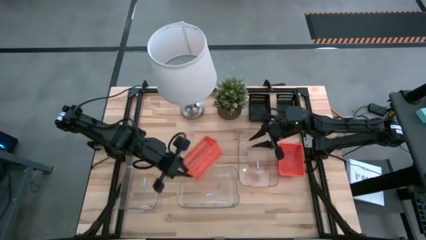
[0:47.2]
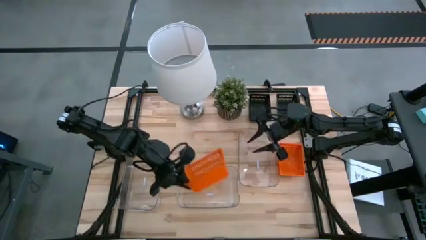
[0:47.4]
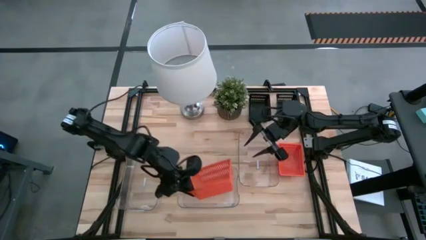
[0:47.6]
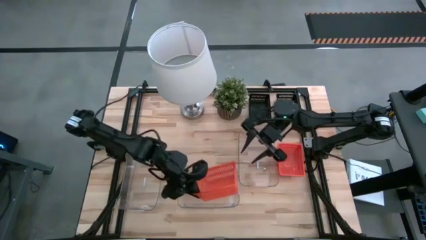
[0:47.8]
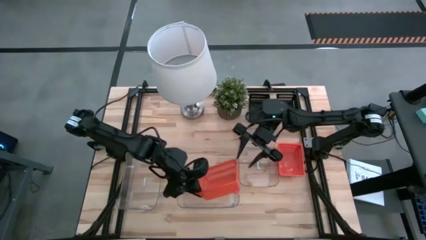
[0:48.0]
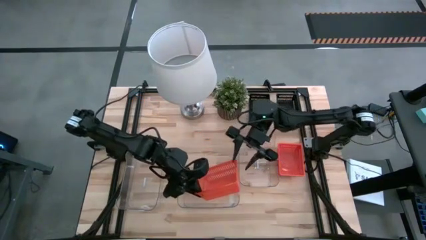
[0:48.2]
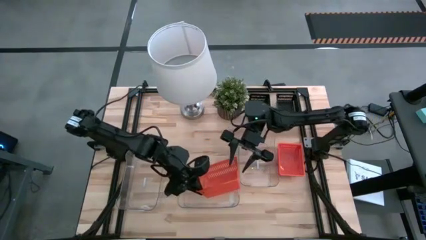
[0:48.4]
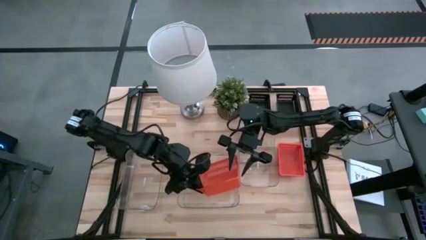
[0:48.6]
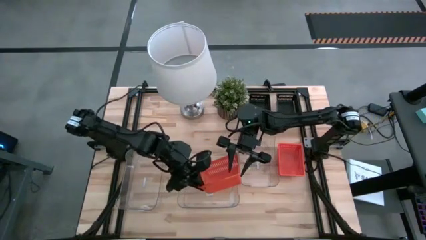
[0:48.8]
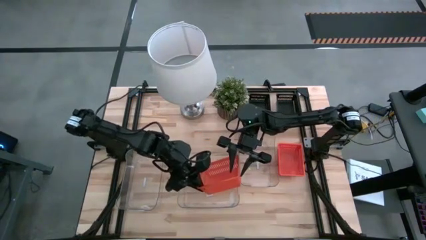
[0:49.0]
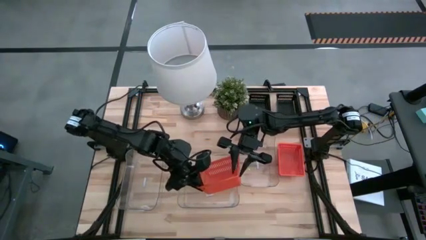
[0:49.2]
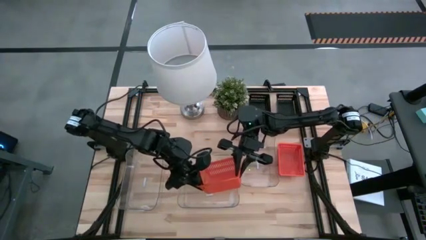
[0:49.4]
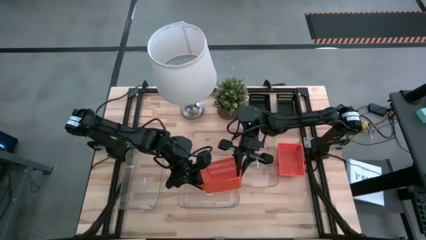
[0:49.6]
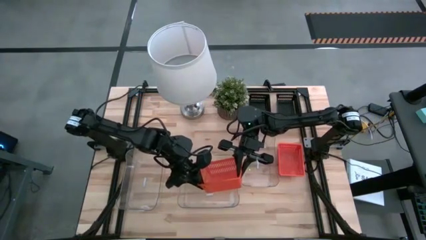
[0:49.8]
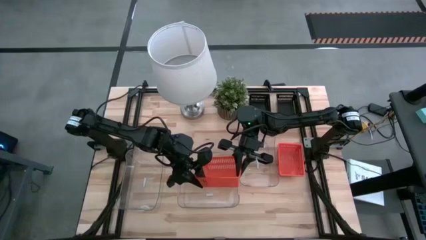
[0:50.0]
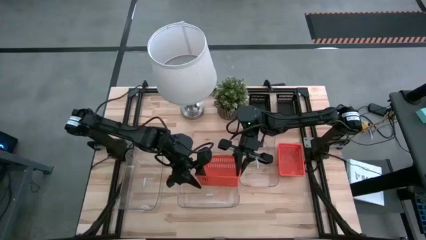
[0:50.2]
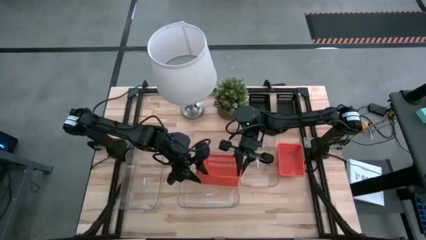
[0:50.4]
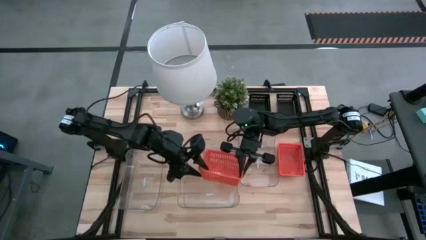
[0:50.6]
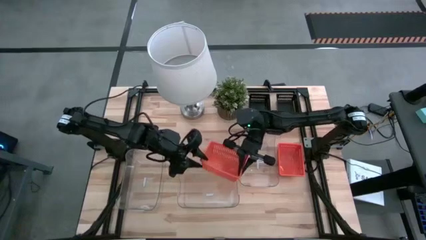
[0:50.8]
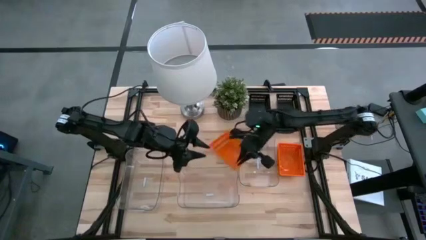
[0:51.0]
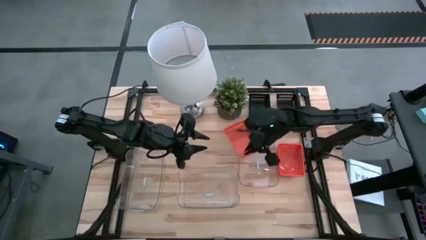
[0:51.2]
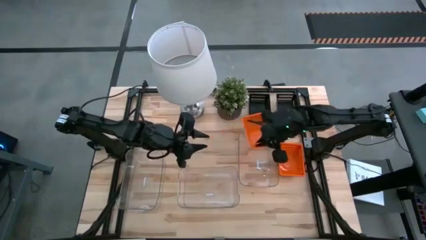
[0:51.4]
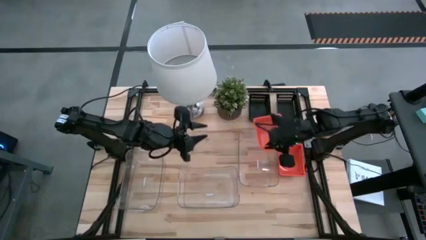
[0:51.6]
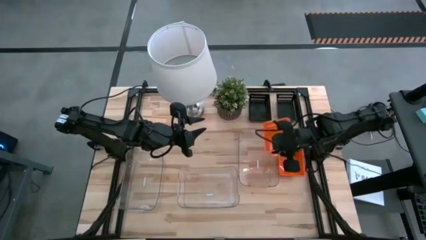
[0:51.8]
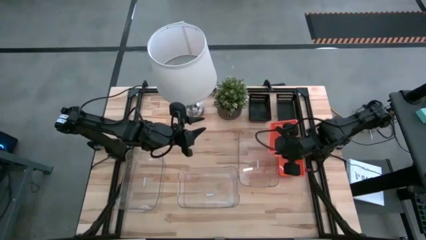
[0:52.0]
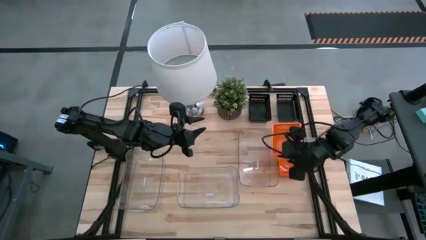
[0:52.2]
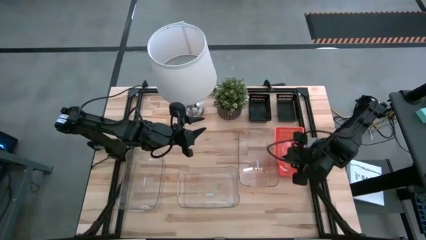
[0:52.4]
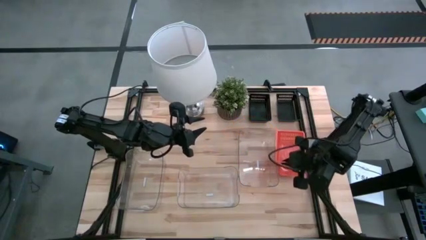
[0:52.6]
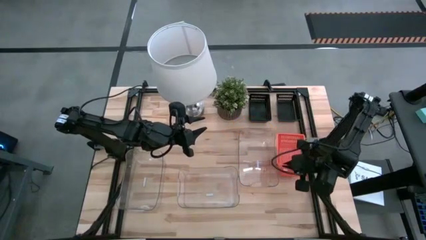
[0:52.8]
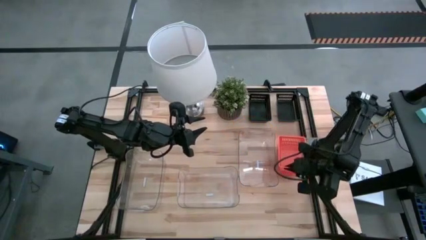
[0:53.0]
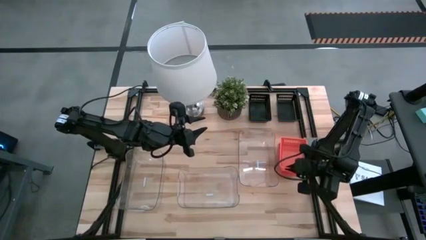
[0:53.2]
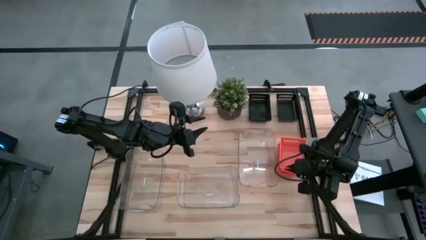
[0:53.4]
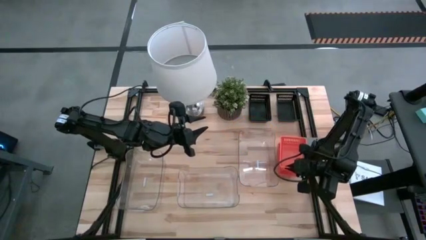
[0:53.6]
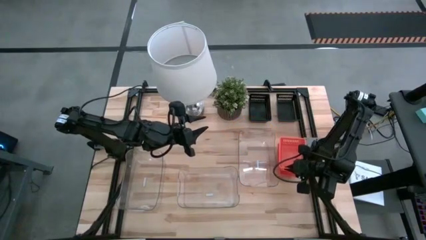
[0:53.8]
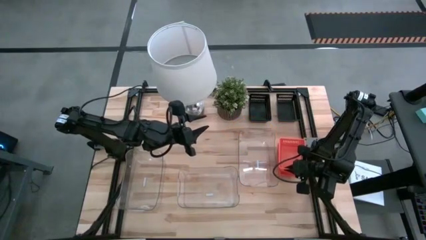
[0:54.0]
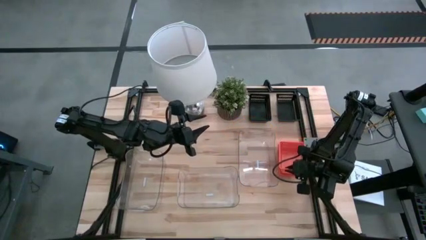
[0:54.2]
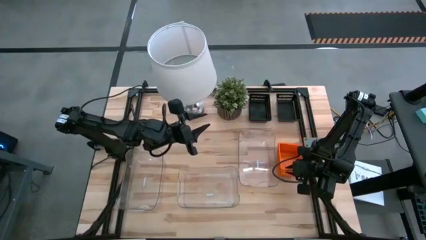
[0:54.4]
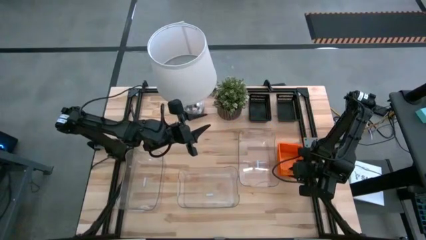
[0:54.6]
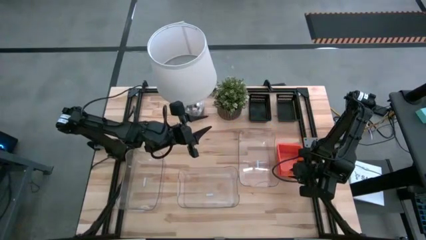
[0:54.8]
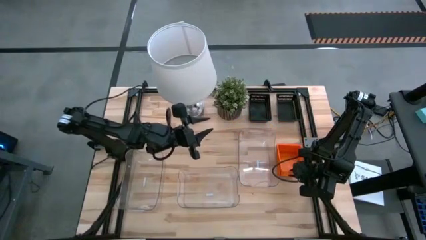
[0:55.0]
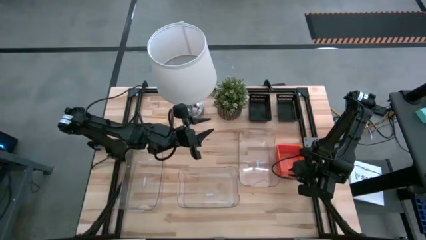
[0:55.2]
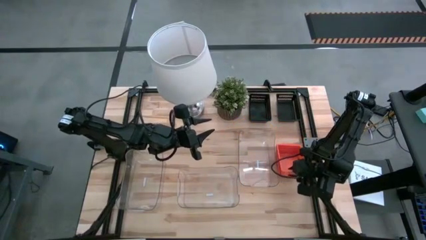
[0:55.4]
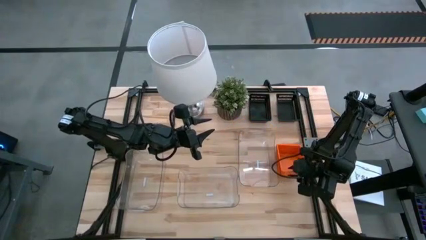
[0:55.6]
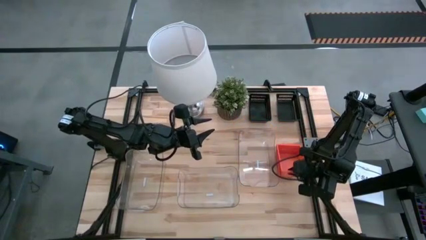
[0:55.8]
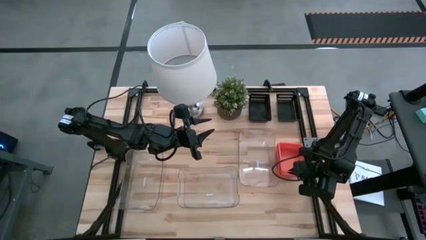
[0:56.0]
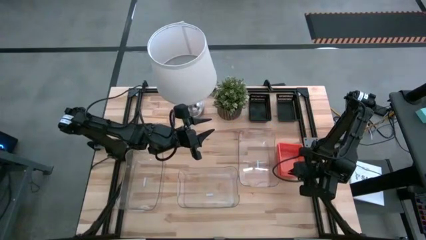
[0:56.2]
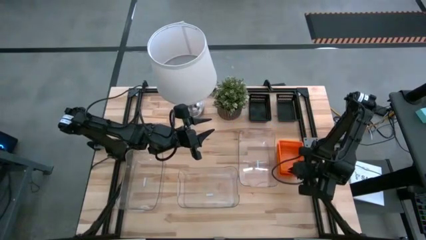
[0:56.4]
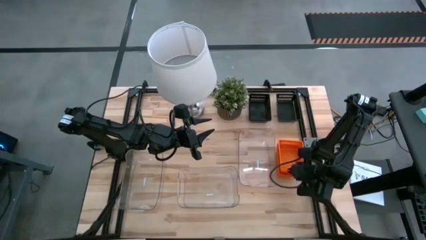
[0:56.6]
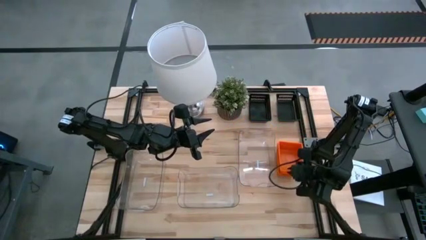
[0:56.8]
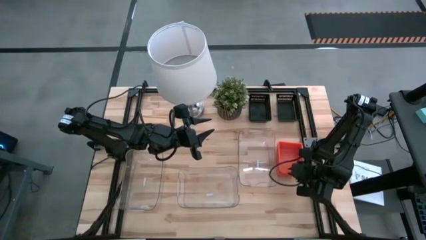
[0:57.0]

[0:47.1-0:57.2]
Stack the left orange bin on the orange bins

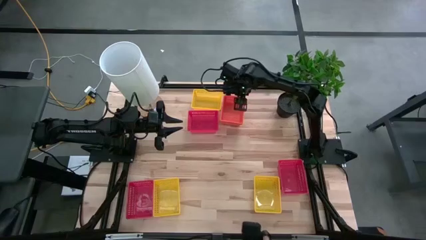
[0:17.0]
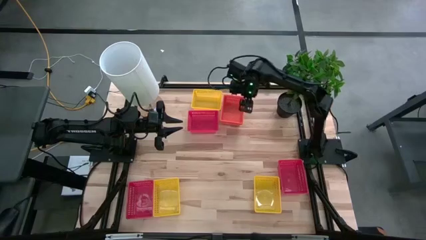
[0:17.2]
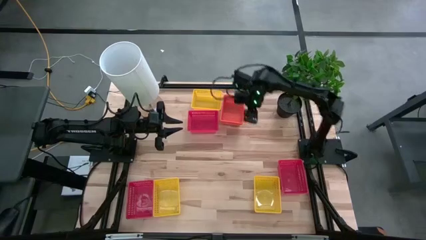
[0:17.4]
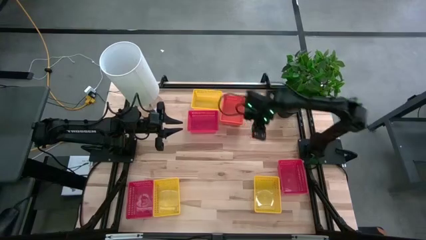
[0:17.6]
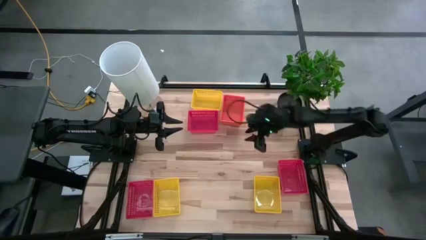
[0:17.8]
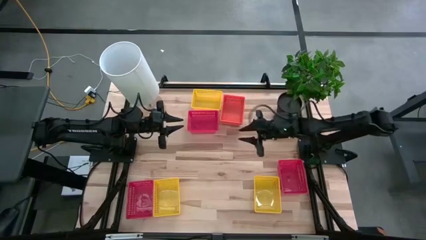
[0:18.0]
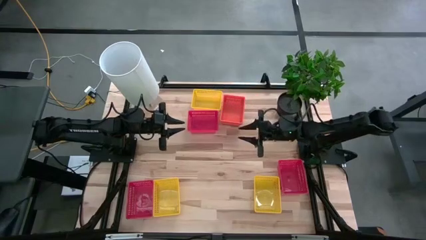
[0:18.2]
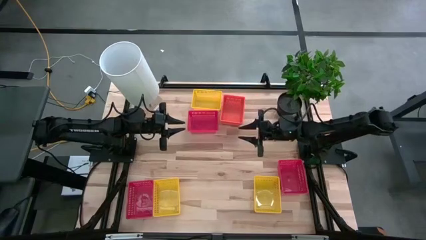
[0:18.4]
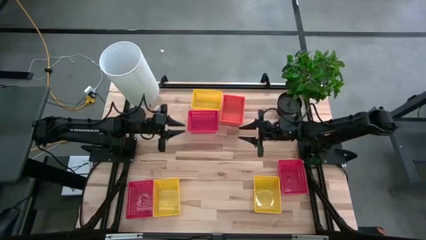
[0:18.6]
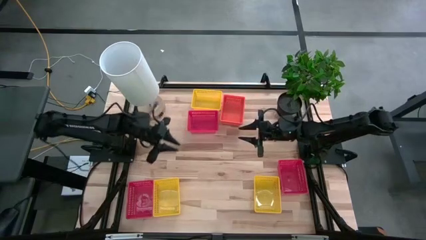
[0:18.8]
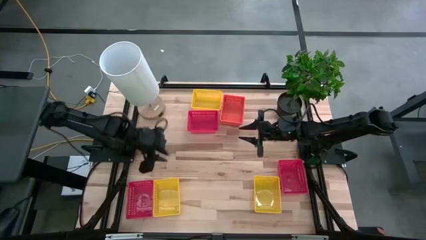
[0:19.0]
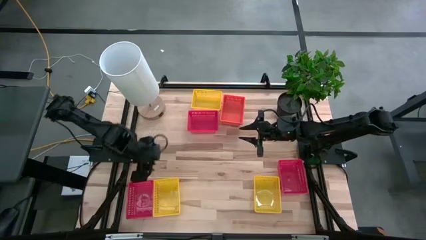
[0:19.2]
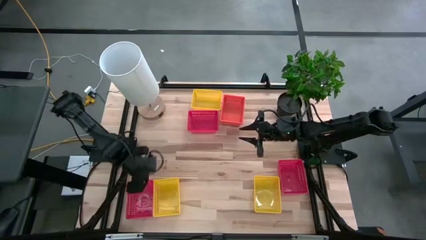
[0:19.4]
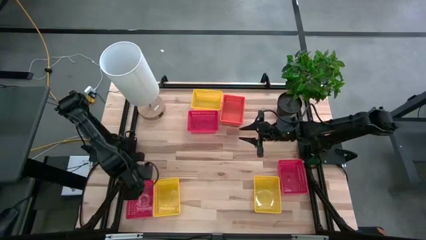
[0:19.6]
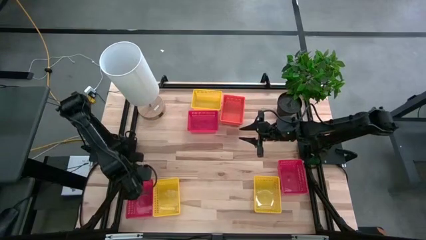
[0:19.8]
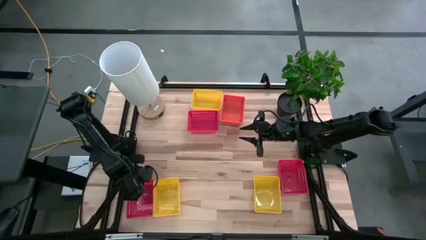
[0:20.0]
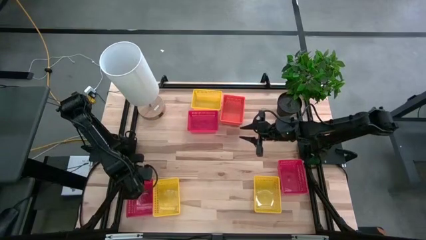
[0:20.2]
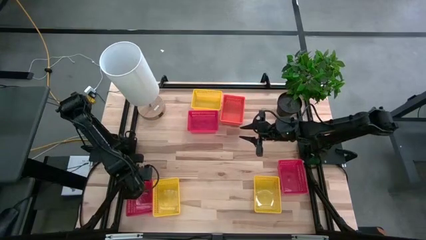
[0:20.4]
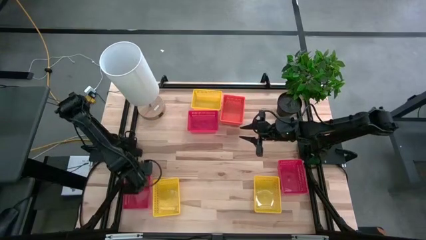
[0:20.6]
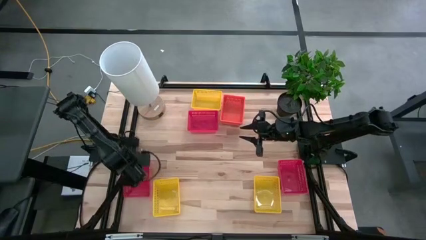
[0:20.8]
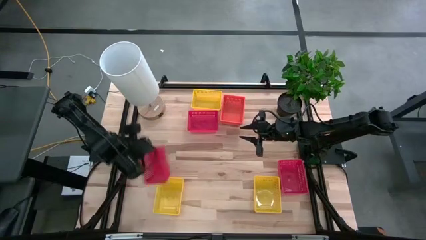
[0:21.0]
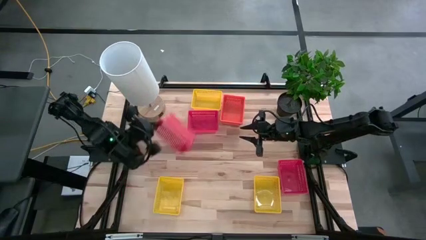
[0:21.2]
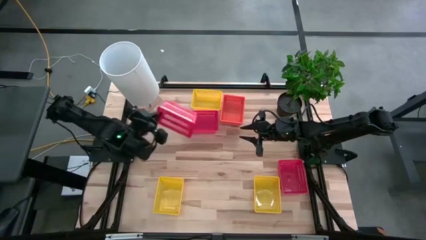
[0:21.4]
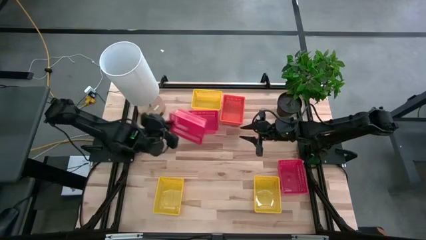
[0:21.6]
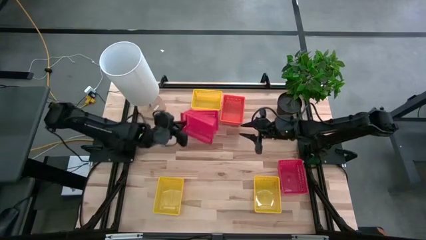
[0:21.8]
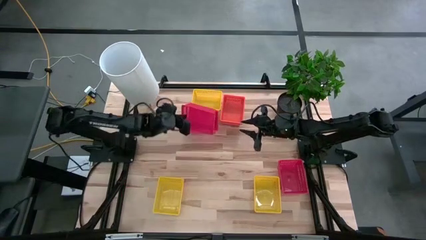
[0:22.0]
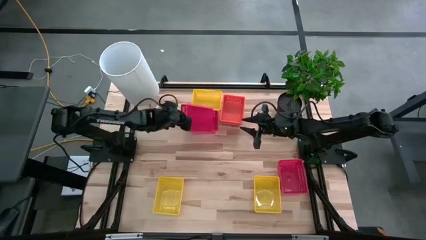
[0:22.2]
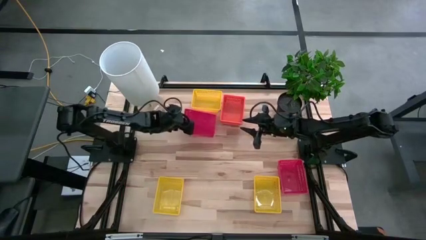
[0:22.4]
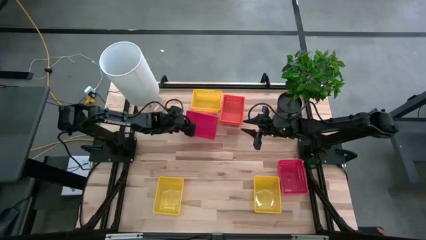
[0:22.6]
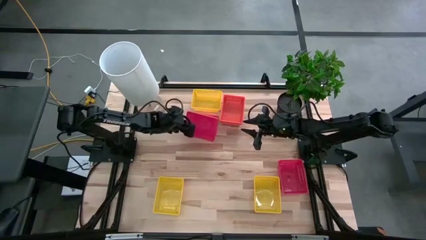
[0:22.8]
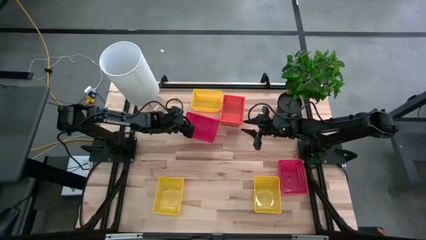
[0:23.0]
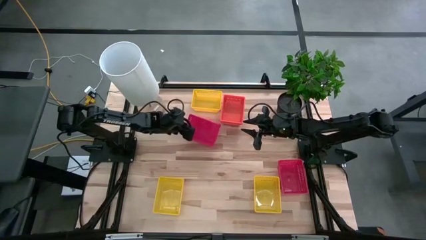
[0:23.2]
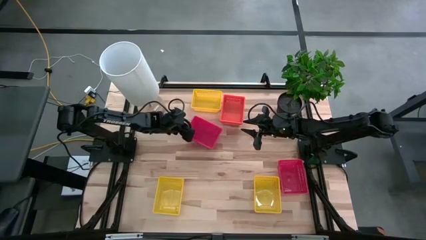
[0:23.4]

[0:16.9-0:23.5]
Stack the left red bin on the top red bin
